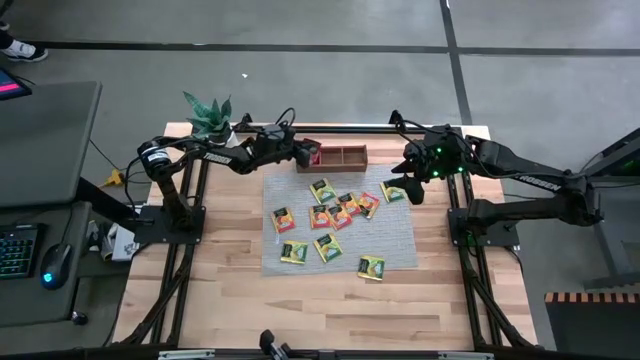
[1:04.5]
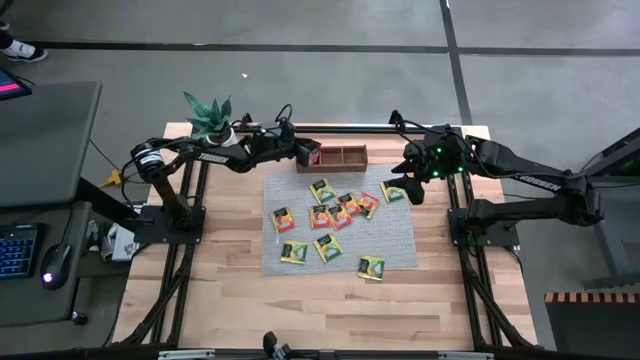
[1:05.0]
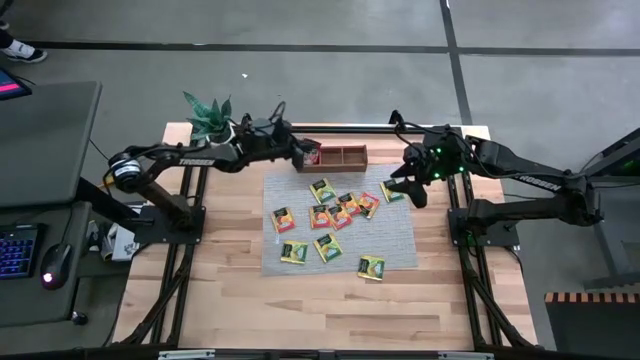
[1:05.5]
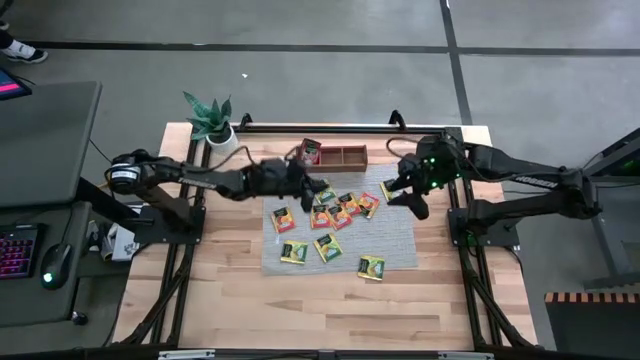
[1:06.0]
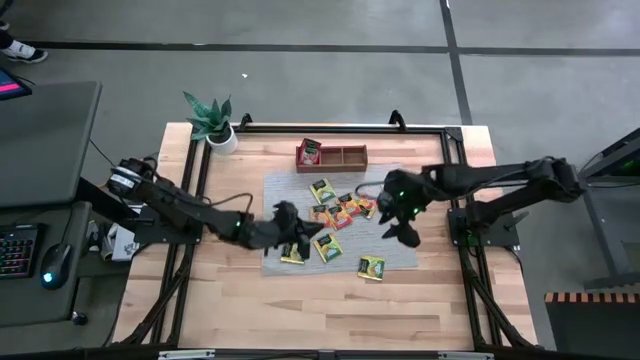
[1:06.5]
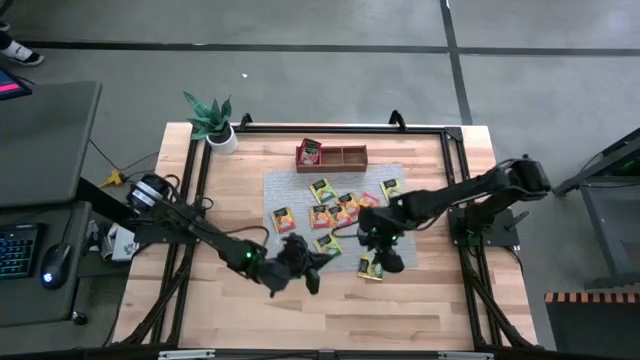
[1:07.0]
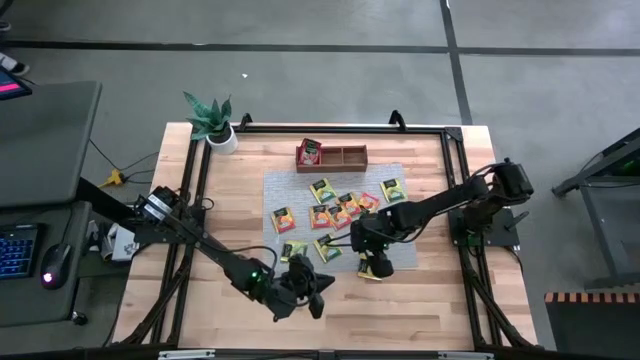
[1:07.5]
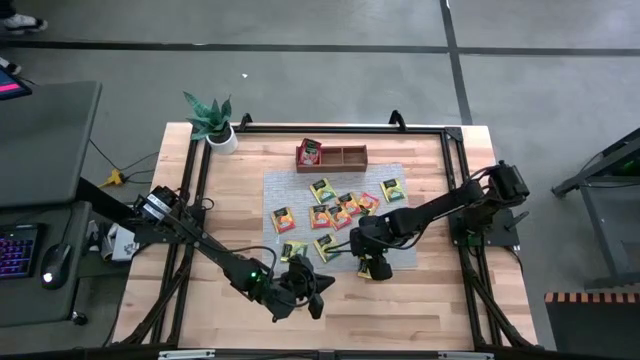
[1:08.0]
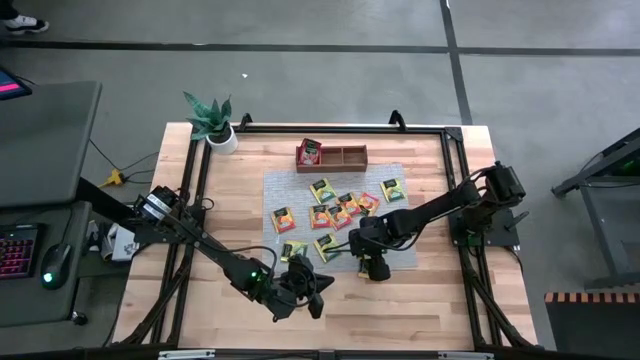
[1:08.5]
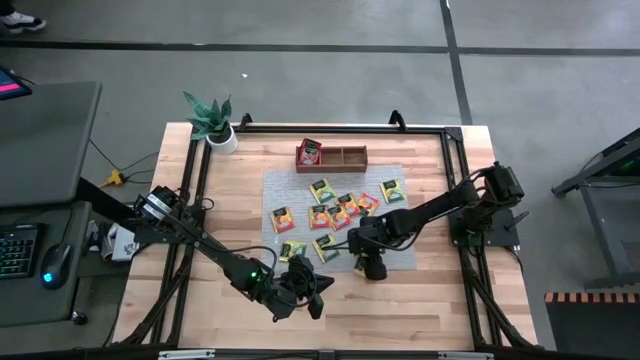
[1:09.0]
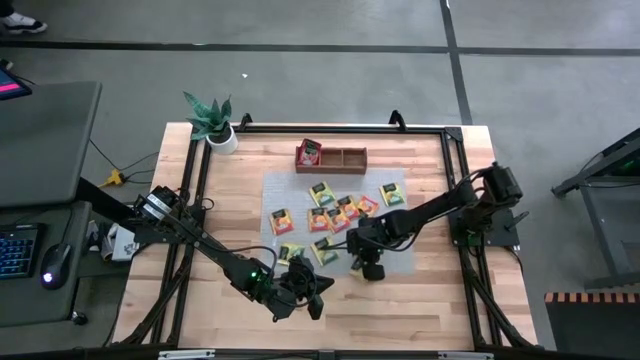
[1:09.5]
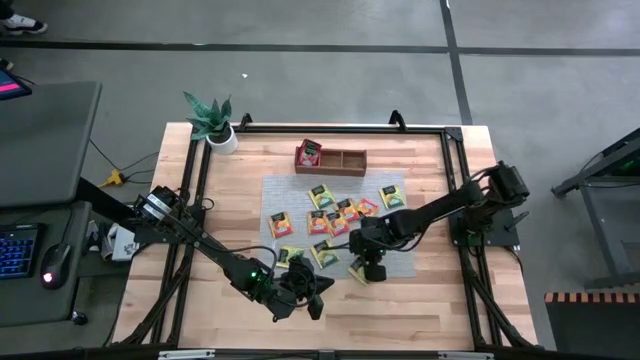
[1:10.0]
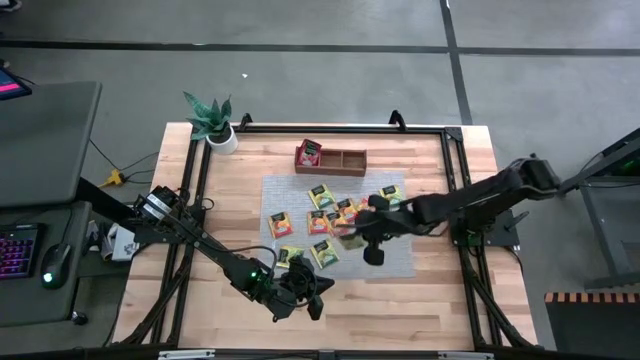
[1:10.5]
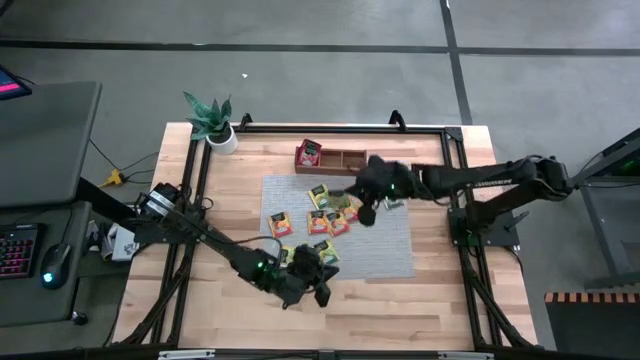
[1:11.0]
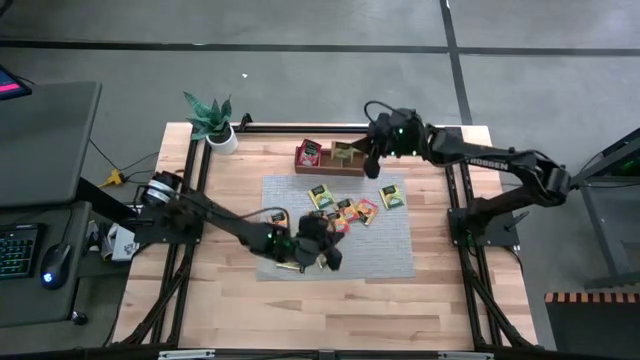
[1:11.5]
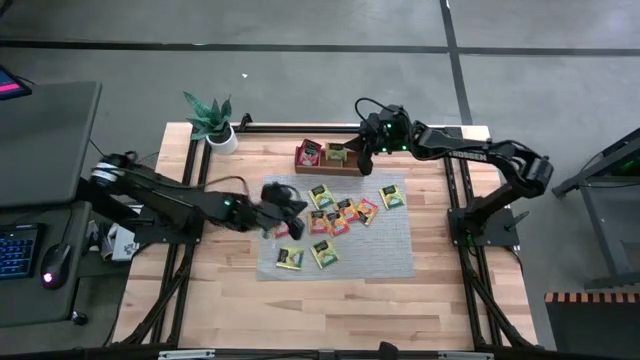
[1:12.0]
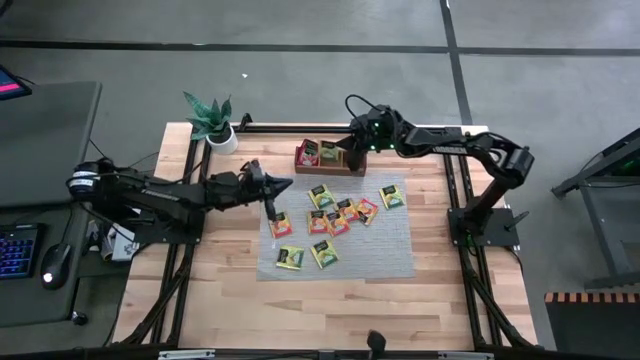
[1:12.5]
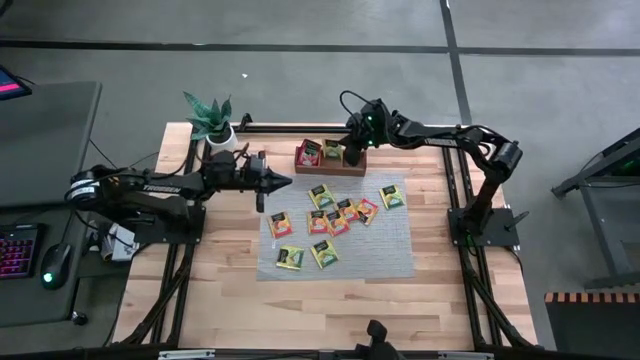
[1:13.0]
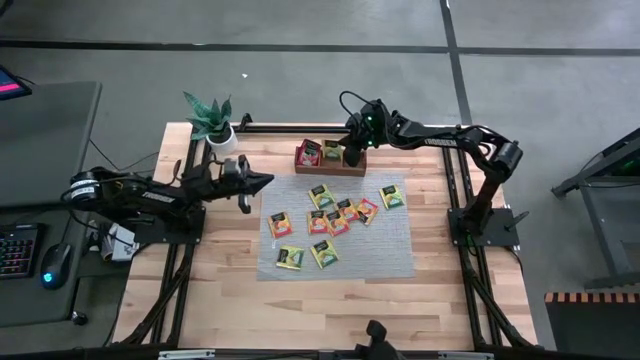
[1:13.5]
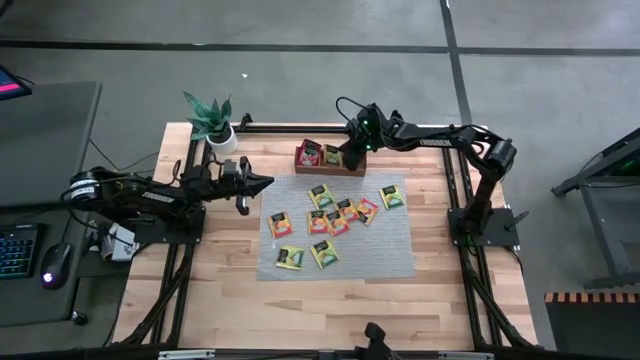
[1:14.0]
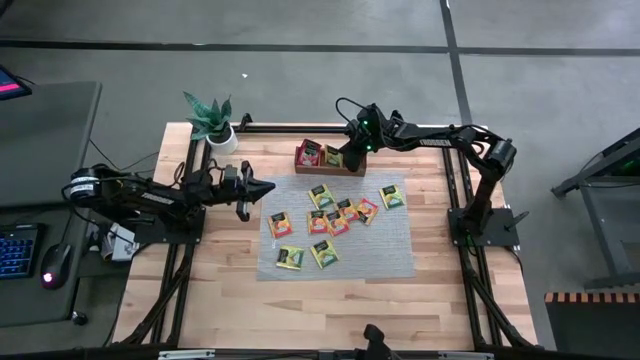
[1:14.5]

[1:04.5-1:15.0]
Task: Pick & Place Tea
Put the yellow tea bag into the middle section of the wooden organizer

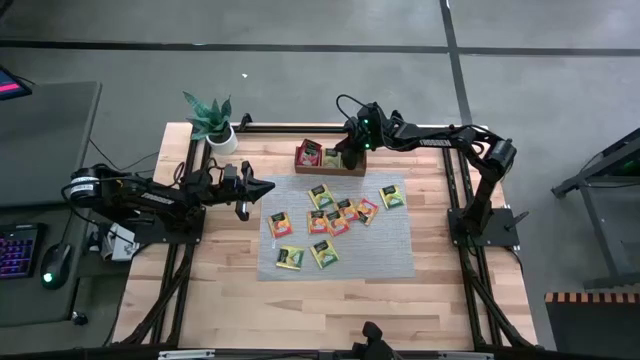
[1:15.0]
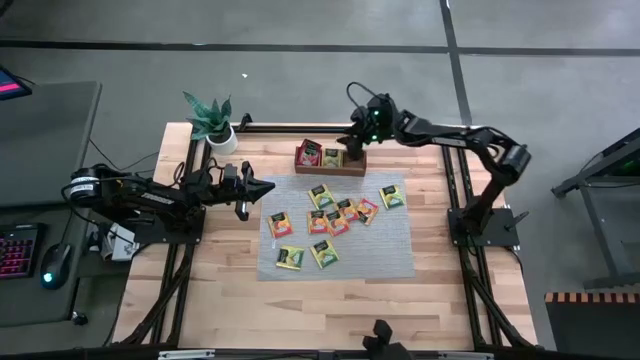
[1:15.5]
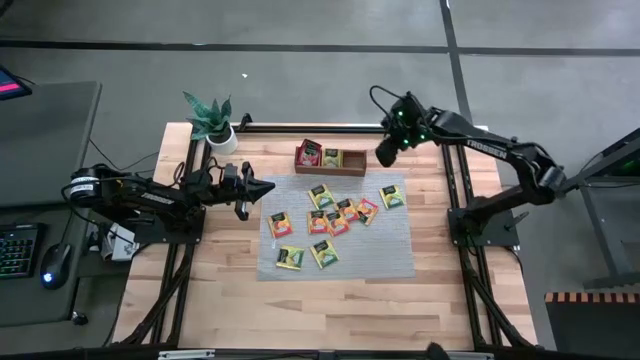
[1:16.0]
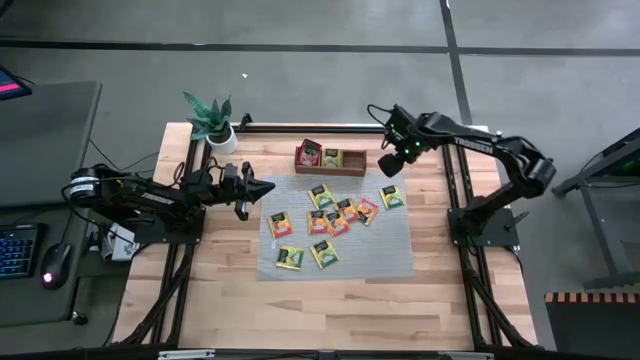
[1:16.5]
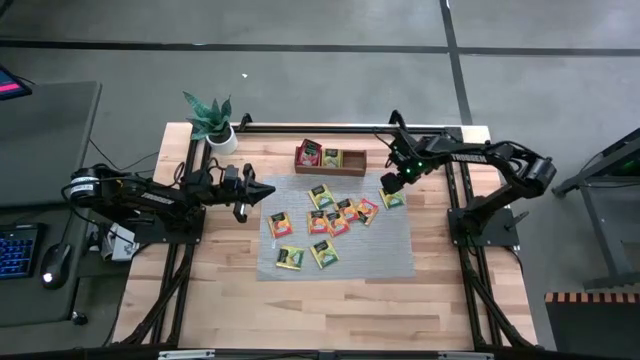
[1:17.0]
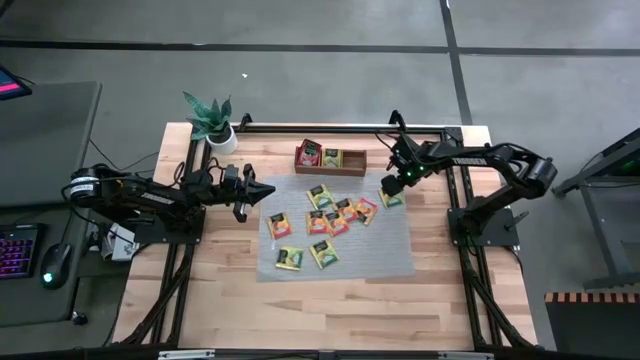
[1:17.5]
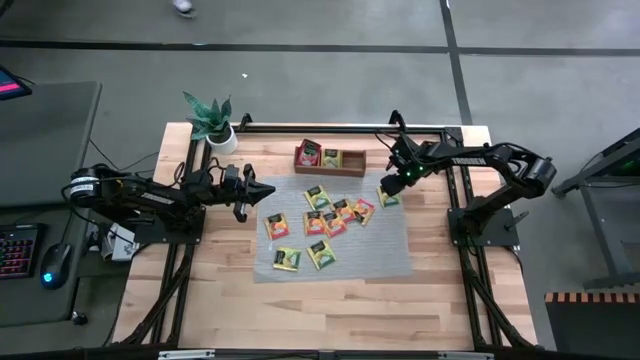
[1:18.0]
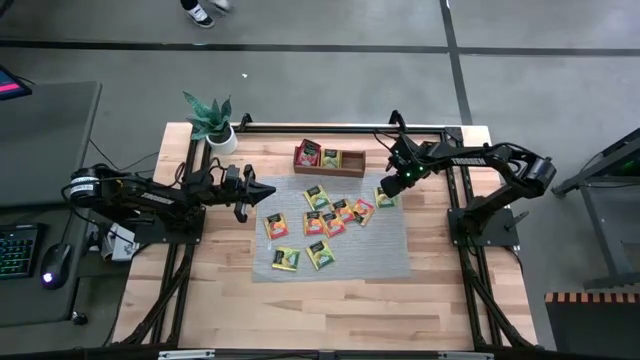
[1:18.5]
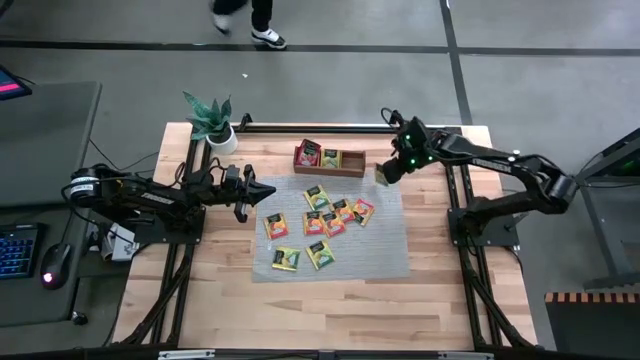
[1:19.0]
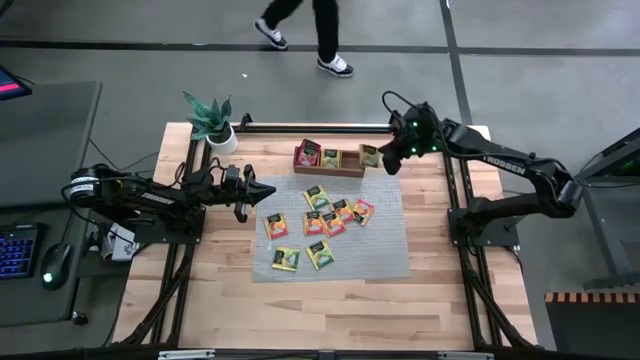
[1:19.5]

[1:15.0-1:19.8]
Put the yellow tea bag into the middle section of the wooden organizer

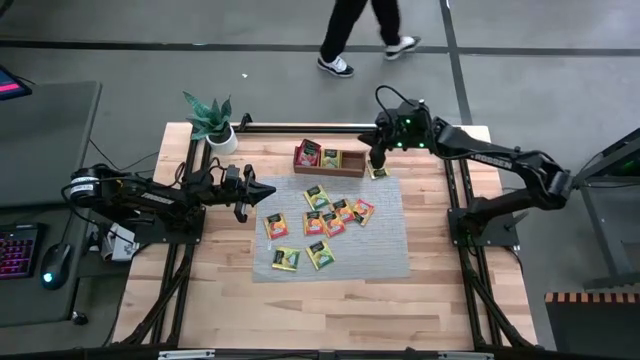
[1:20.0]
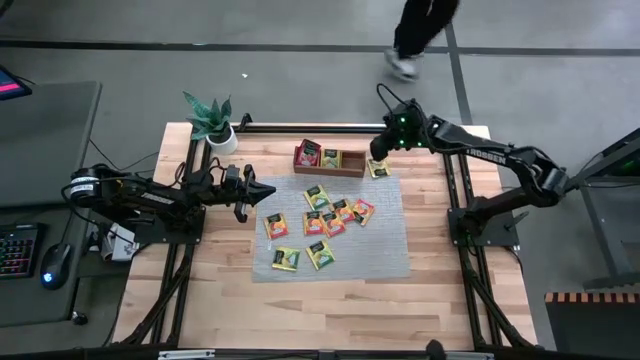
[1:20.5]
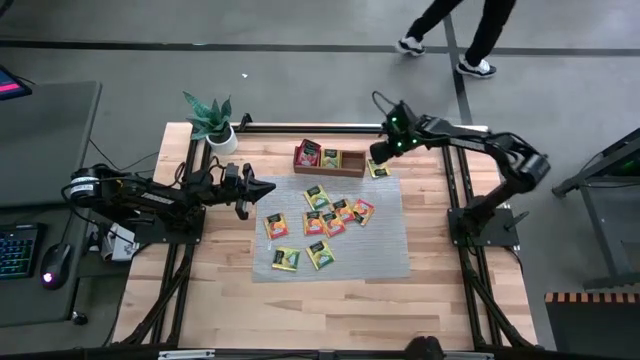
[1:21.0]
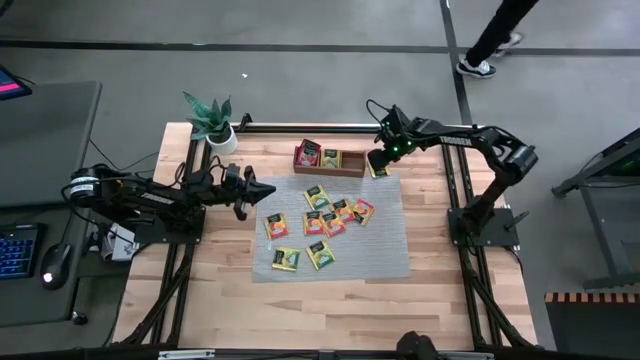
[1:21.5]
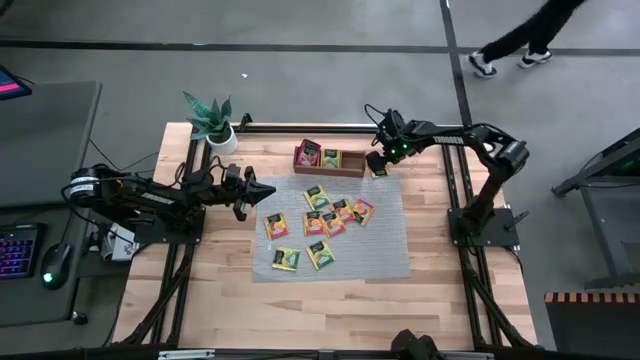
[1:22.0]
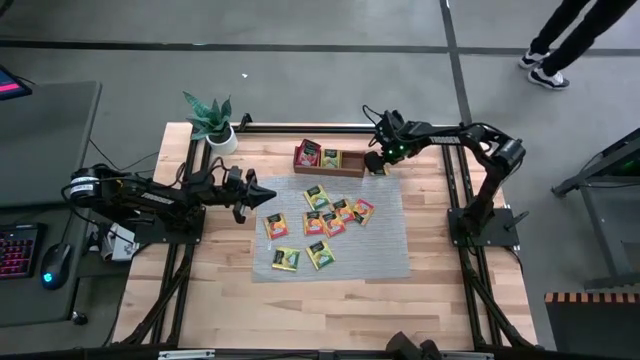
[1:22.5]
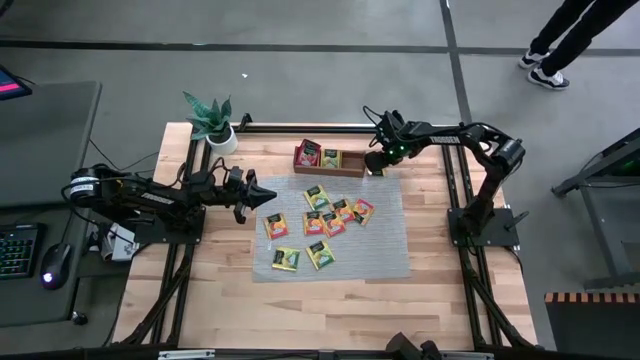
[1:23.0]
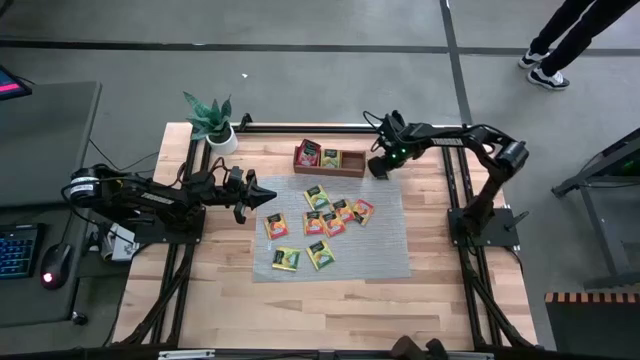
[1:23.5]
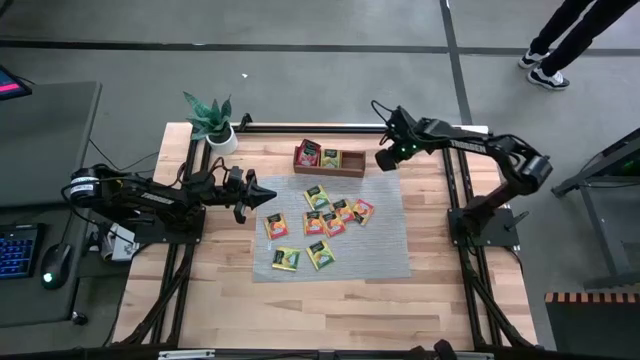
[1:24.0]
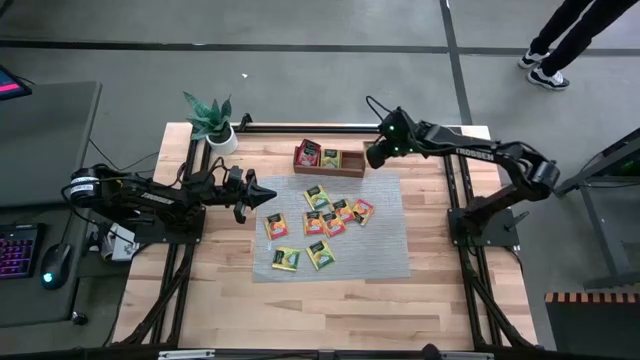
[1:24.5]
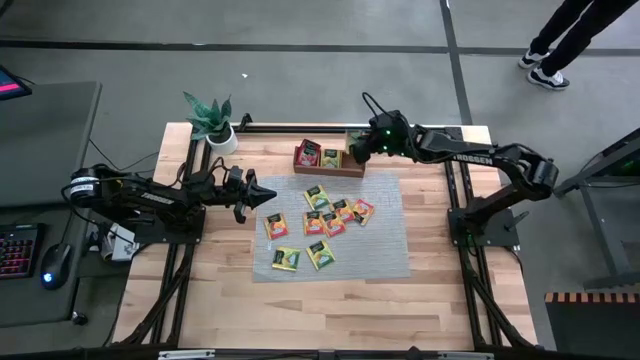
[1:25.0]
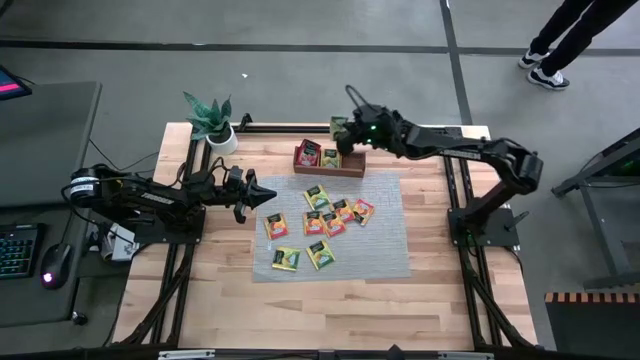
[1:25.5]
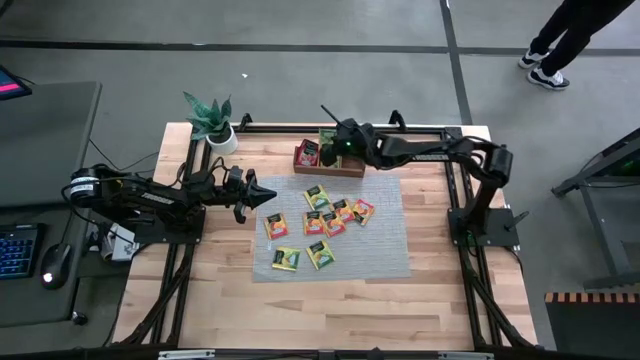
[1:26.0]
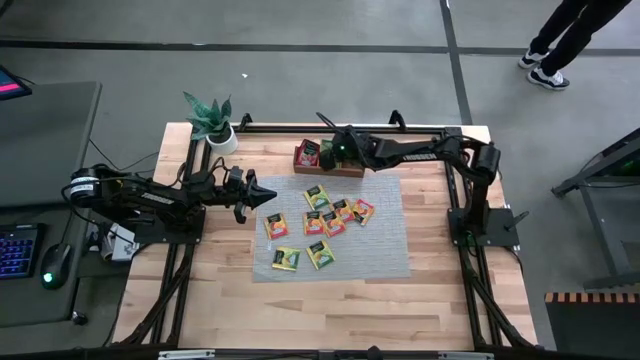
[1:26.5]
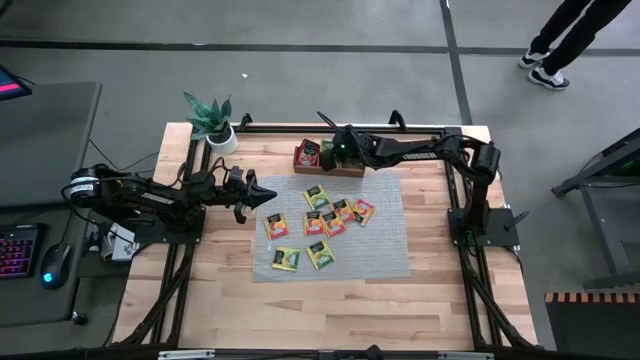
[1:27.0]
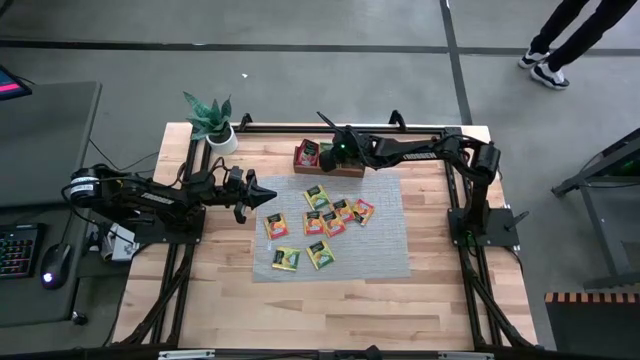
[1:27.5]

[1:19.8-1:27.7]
Put the yellow tea bag into the middle section of the wooden organizer
